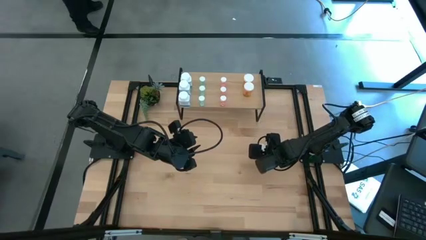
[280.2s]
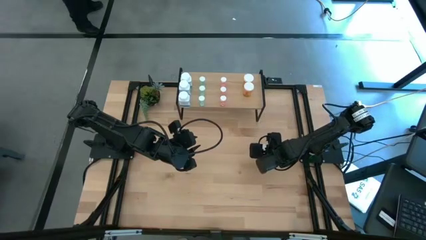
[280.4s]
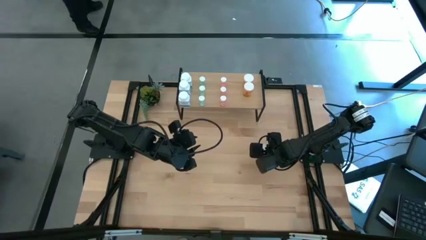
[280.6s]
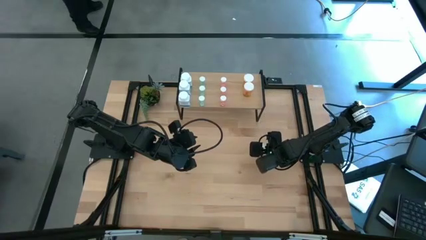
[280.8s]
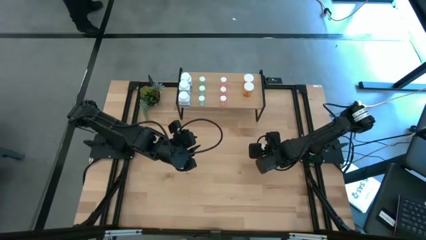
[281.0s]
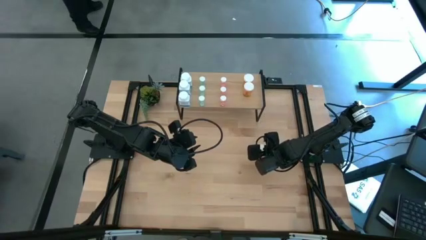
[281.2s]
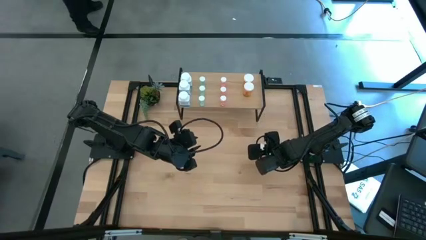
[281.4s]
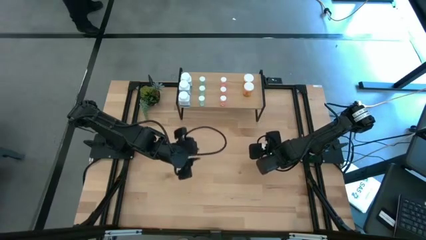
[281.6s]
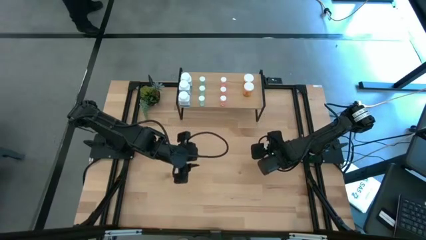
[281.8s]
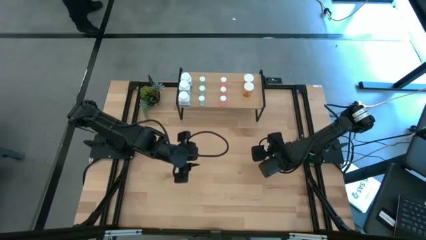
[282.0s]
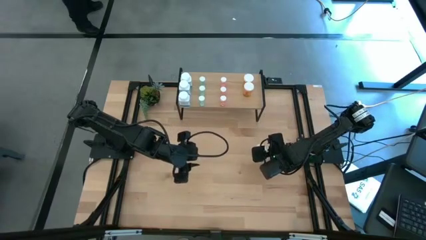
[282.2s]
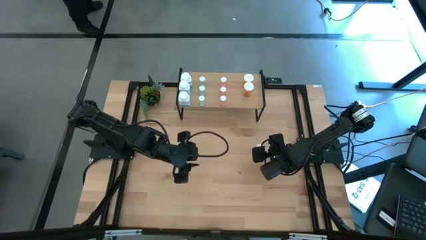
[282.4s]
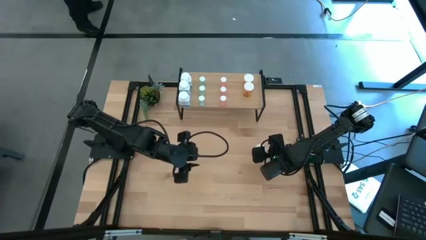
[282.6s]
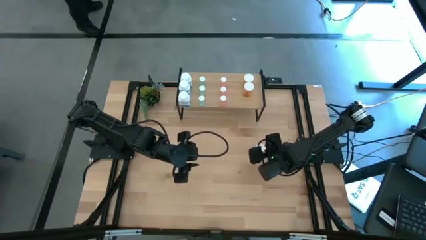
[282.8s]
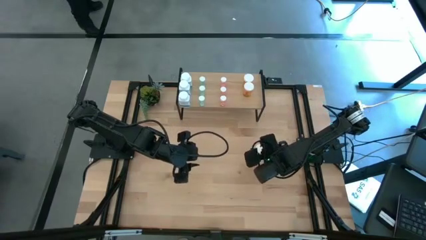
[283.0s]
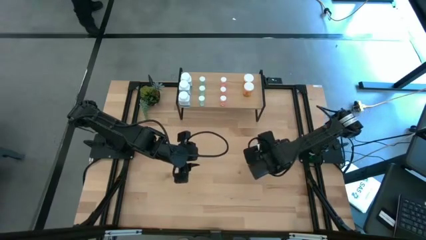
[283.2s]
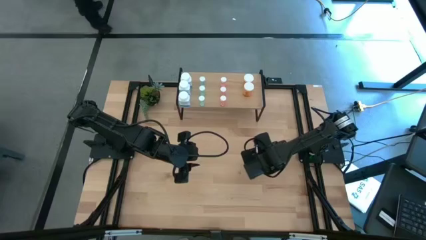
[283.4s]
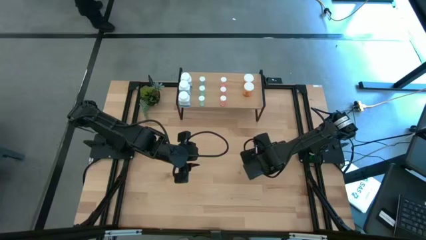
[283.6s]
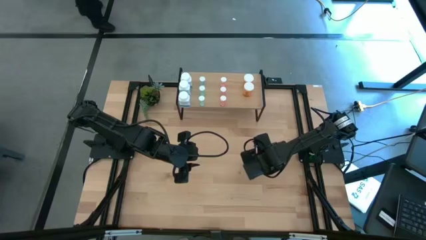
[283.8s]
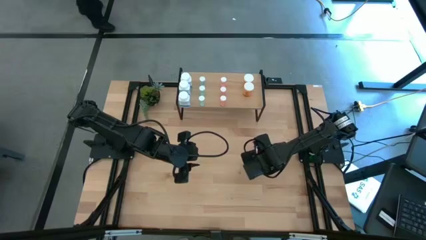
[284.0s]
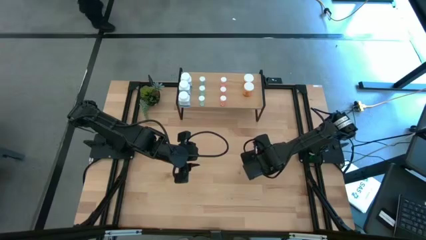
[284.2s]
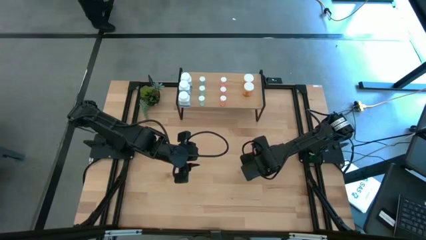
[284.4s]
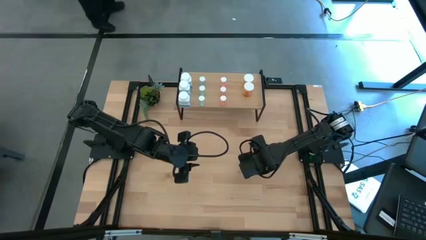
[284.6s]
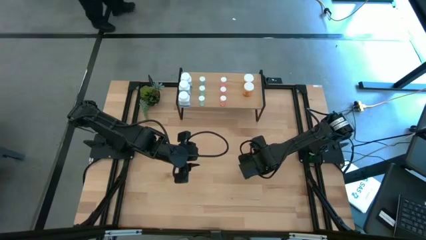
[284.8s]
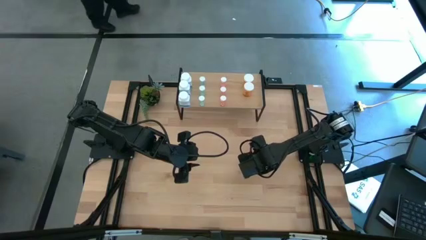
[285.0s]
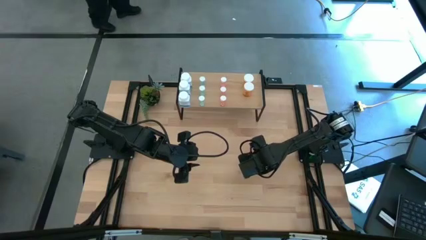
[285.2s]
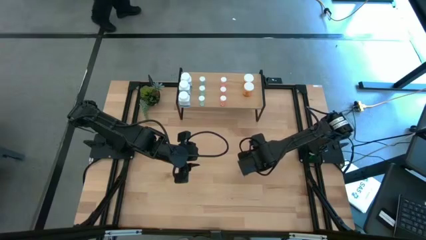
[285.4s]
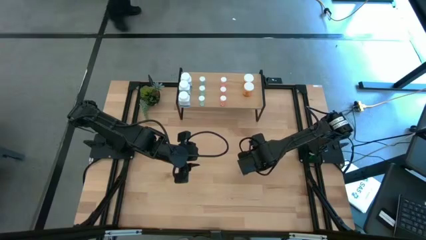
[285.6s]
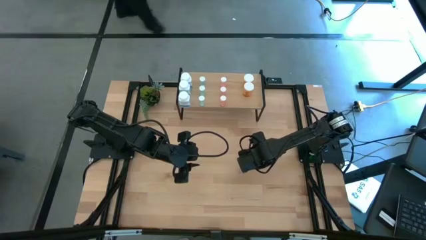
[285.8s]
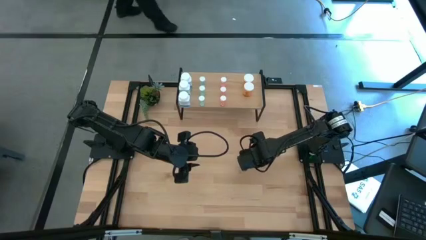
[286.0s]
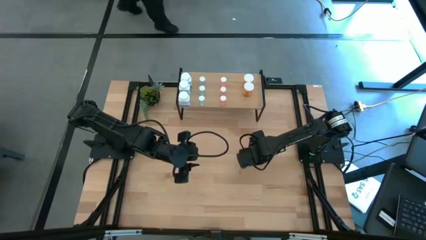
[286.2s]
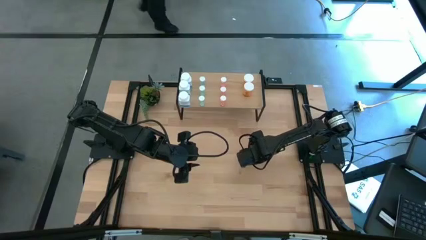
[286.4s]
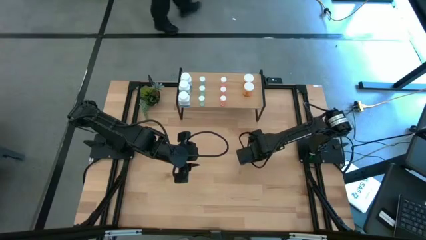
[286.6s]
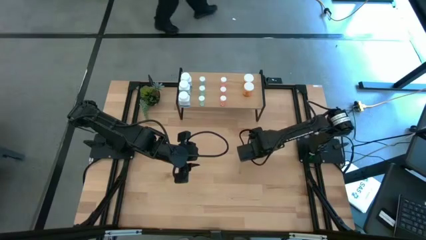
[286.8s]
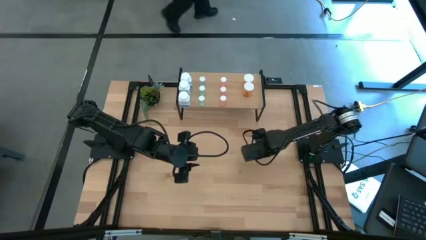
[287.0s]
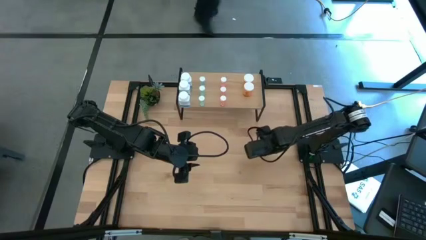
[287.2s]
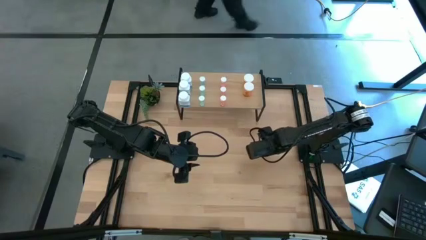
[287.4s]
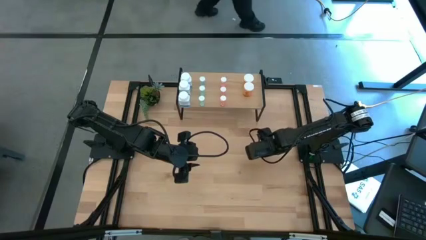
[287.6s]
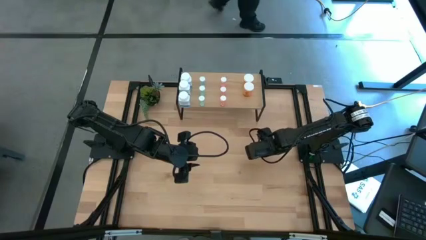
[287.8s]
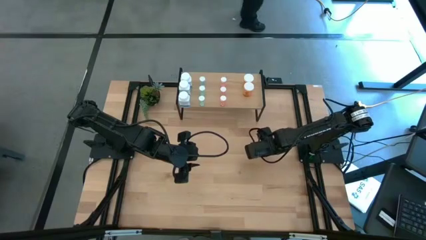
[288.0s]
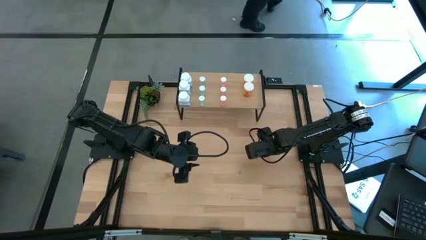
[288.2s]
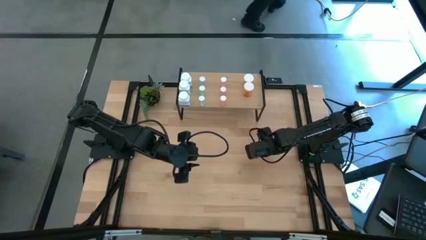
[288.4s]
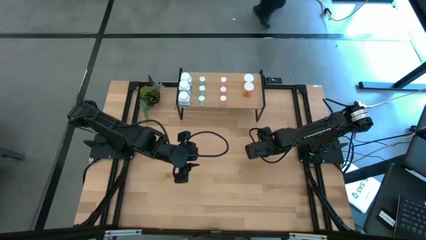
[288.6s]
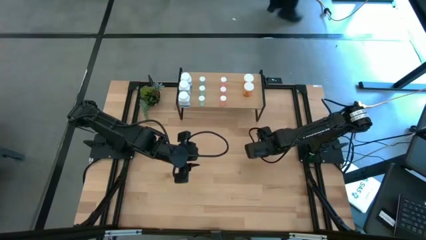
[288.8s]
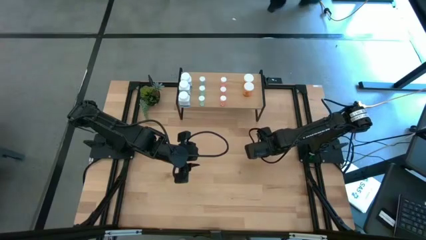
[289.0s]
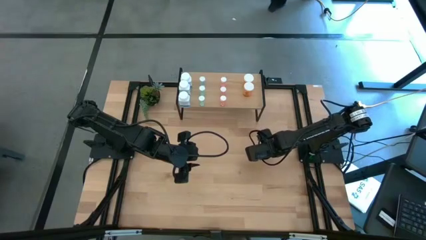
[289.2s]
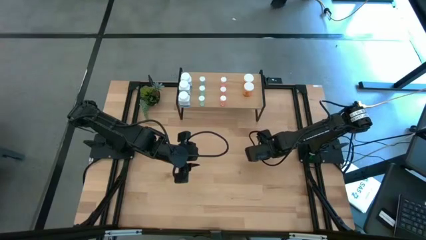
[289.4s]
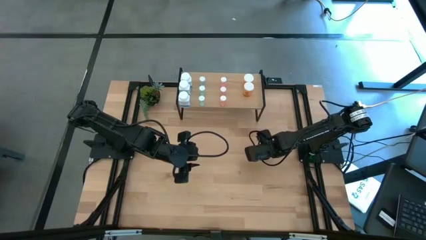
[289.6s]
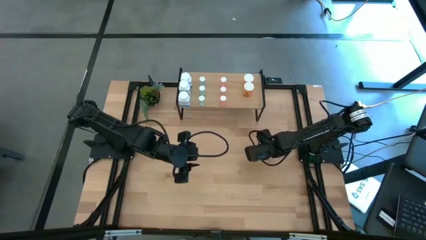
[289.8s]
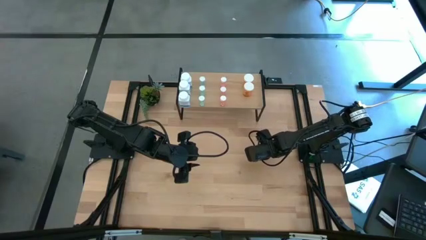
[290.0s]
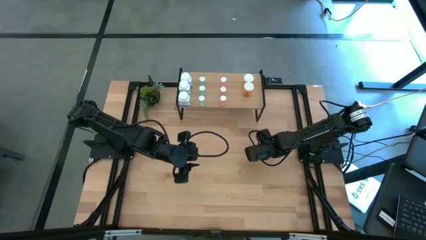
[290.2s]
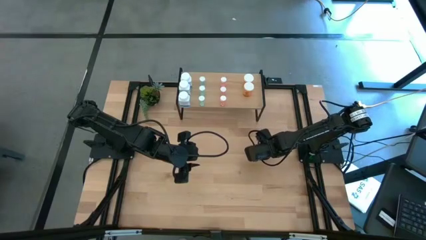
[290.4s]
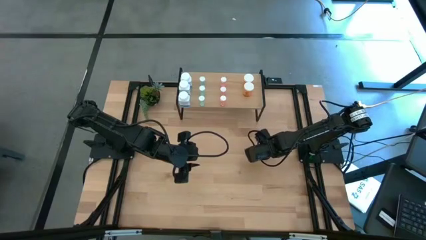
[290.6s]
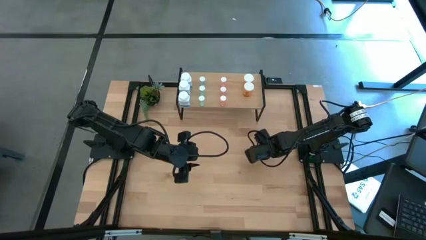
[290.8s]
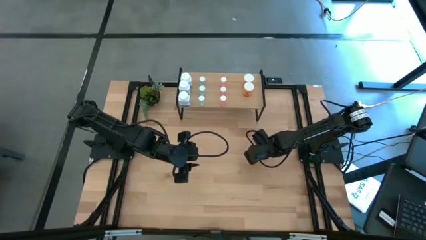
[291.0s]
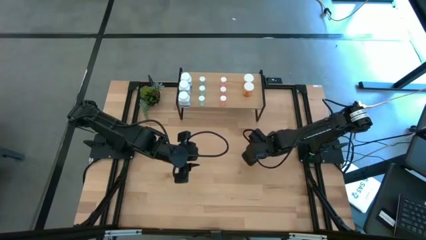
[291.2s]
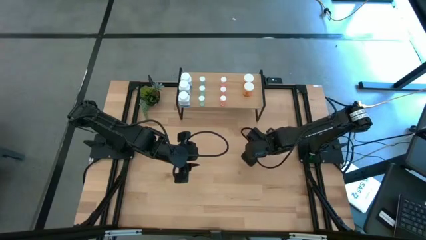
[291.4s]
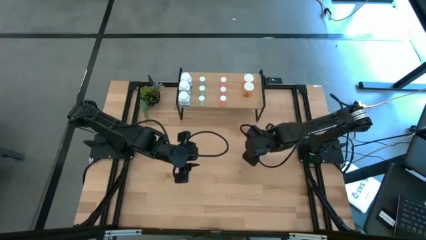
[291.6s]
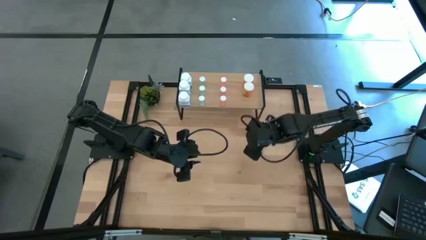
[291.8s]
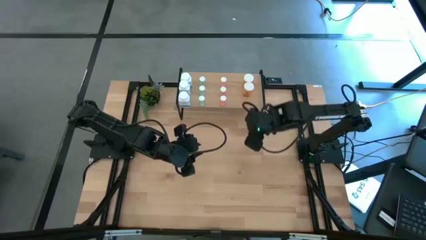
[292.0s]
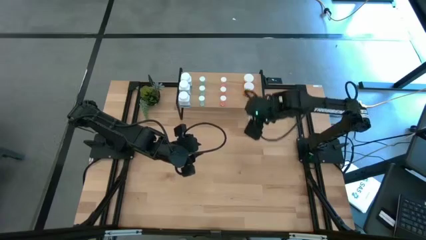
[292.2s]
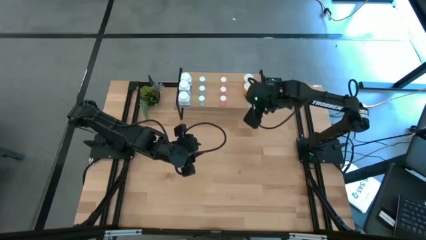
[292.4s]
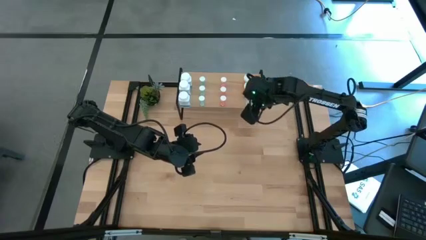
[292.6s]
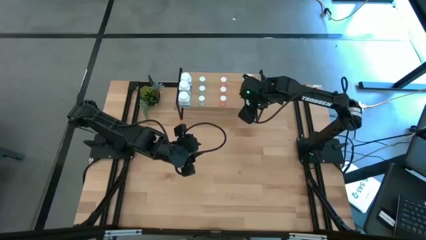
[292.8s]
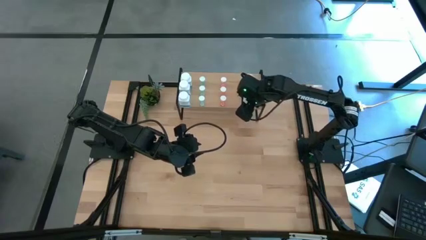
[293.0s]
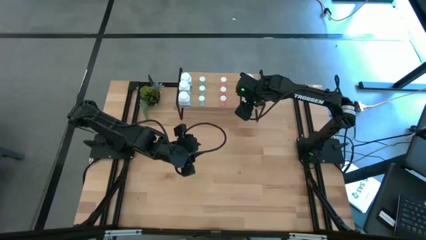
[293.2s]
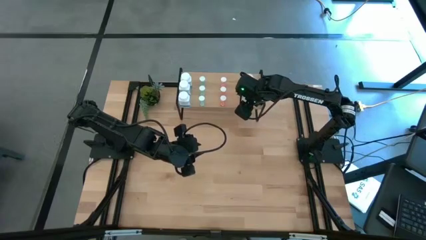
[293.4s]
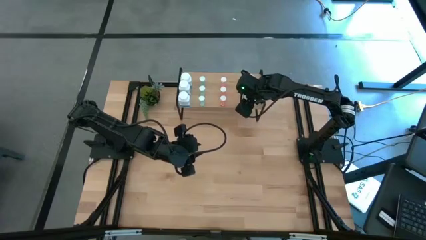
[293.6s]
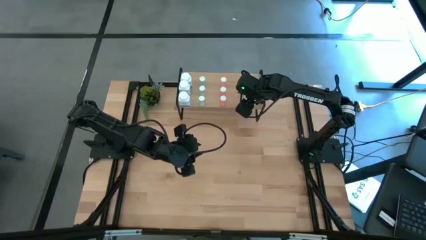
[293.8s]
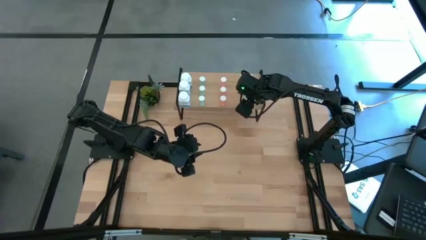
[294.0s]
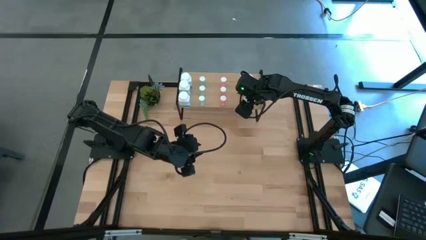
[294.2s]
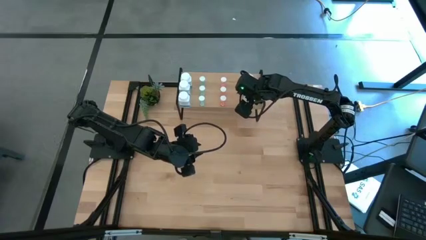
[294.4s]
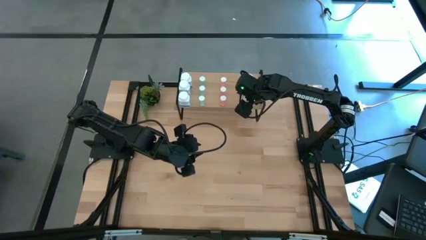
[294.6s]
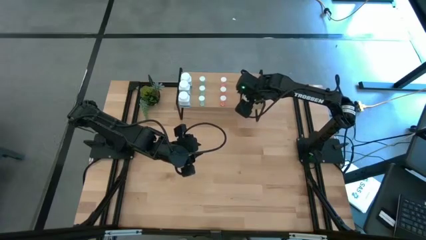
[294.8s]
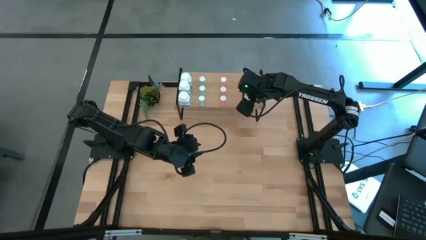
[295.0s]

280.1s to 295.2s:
Task: Pick and place medicine bottles onto shelf by color
Put the orange pill bottle on the shelf aligned with the other orange pill bottles
